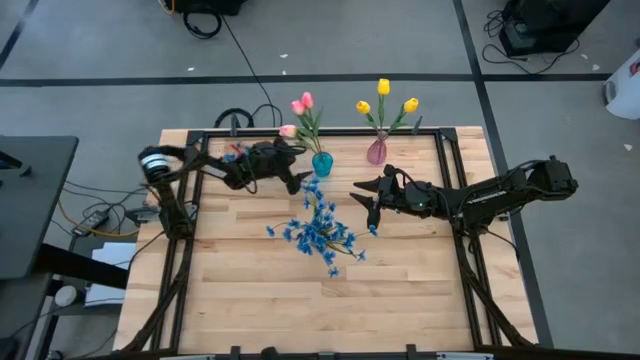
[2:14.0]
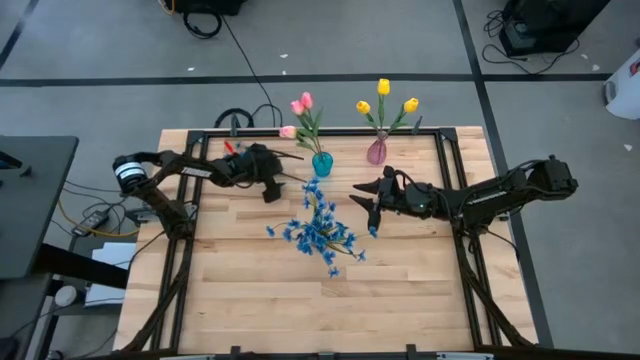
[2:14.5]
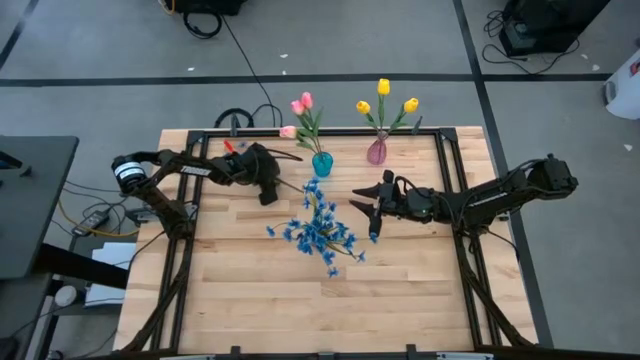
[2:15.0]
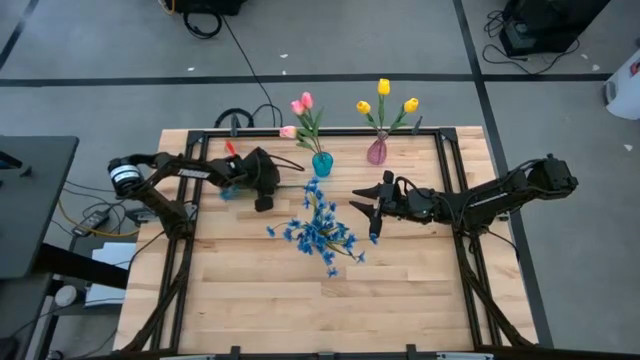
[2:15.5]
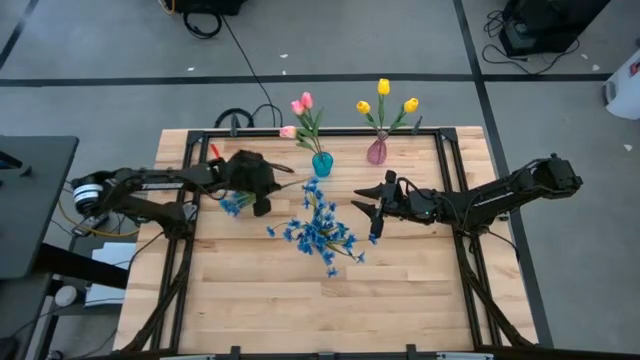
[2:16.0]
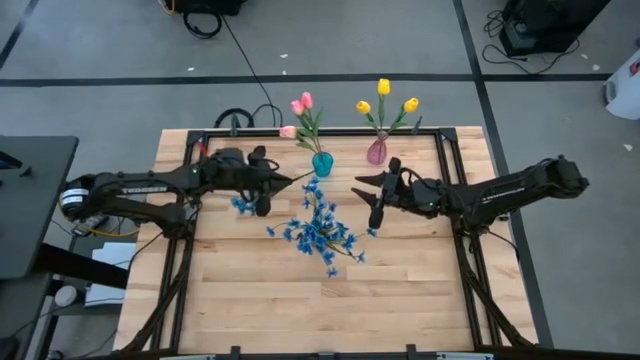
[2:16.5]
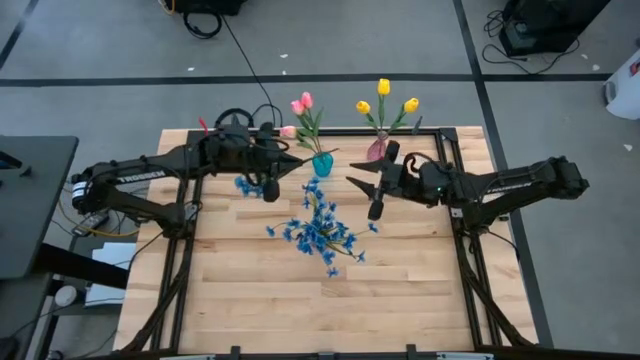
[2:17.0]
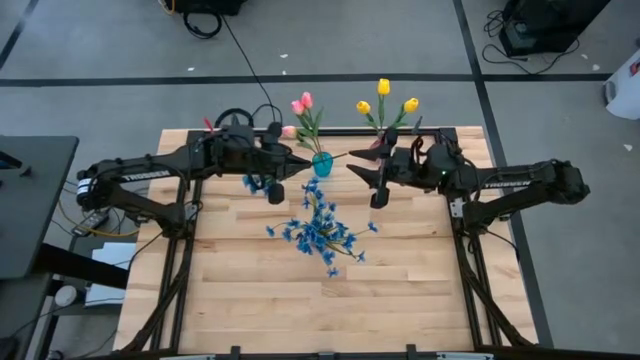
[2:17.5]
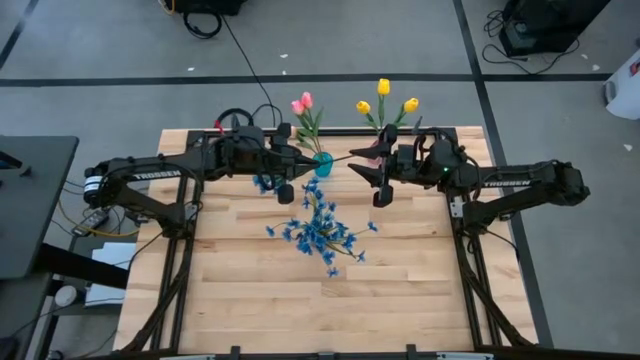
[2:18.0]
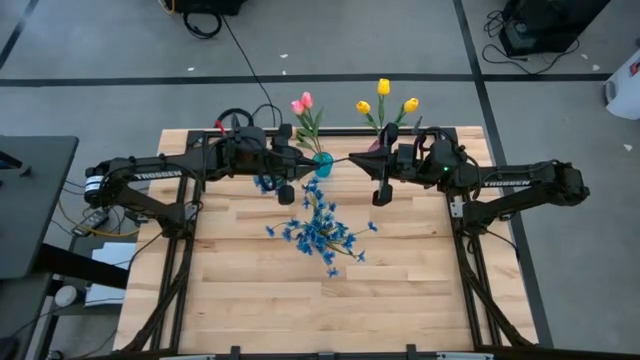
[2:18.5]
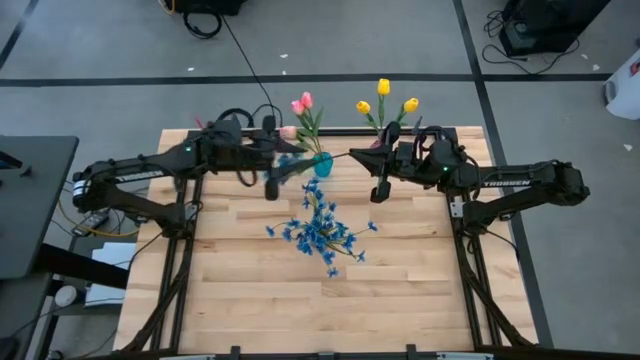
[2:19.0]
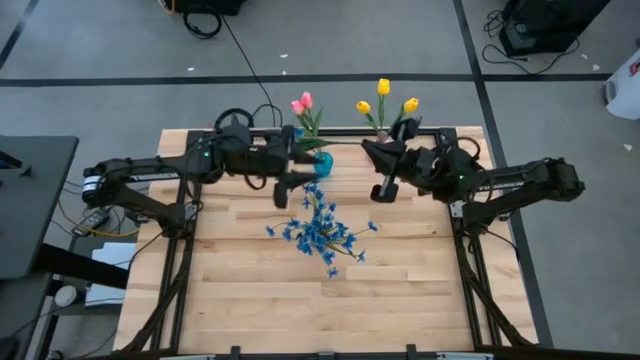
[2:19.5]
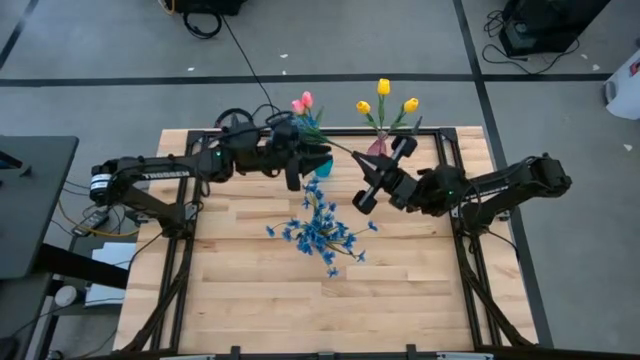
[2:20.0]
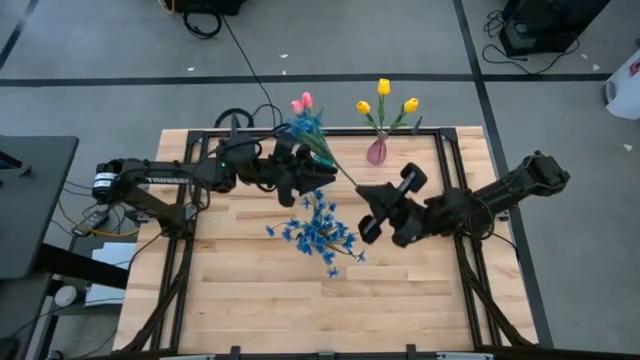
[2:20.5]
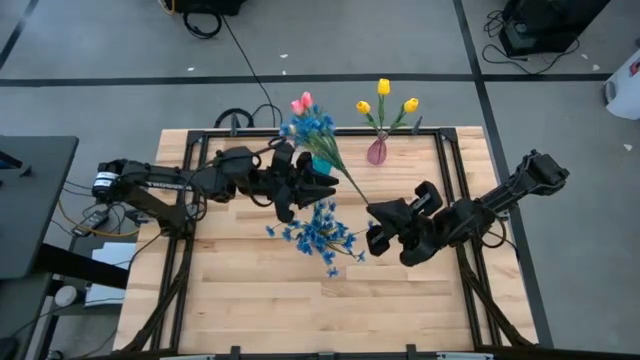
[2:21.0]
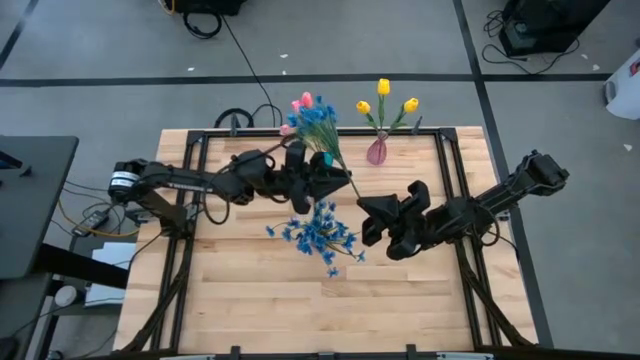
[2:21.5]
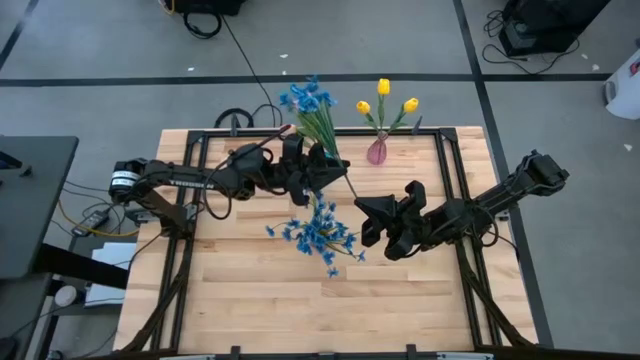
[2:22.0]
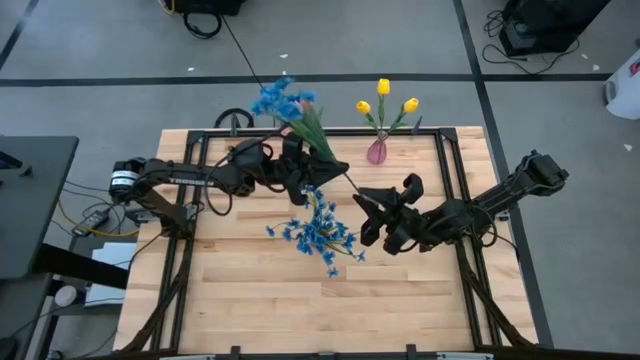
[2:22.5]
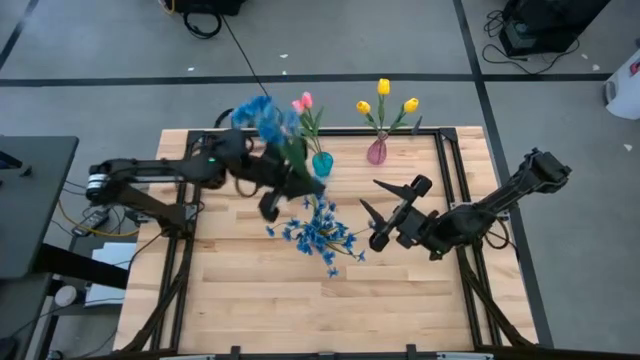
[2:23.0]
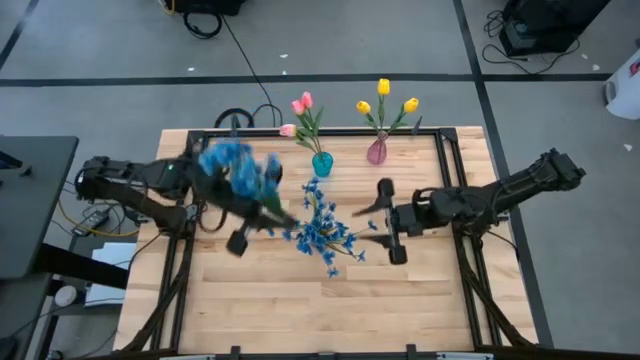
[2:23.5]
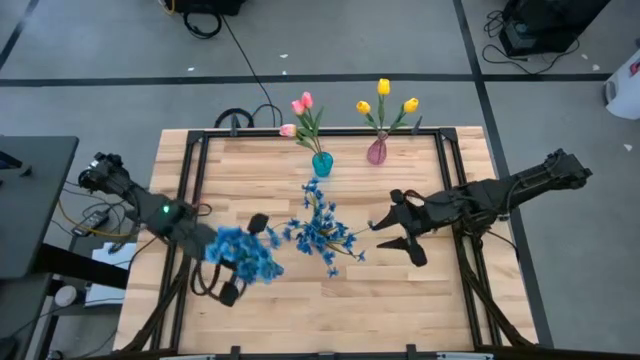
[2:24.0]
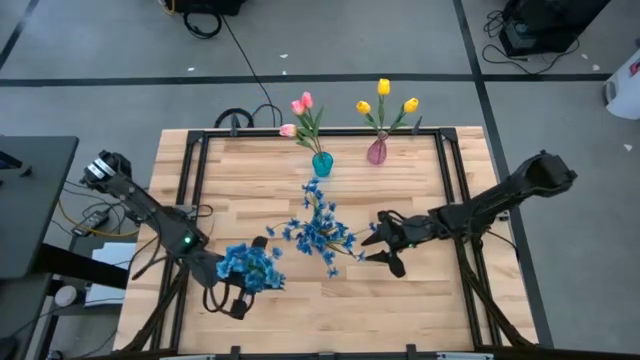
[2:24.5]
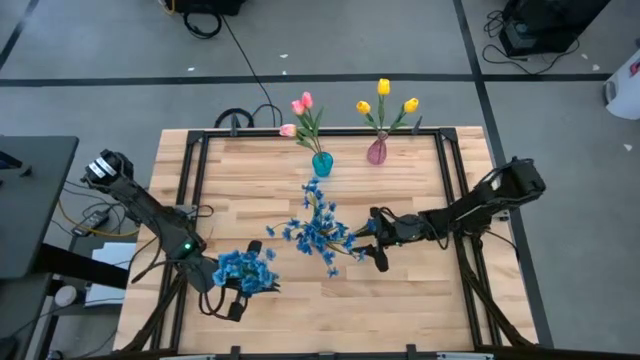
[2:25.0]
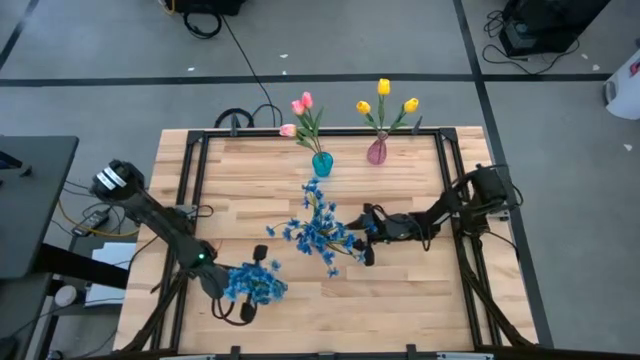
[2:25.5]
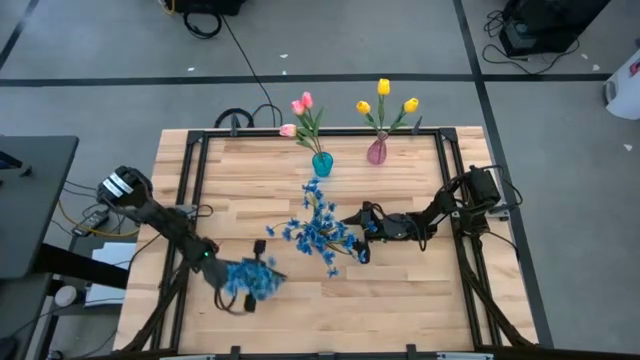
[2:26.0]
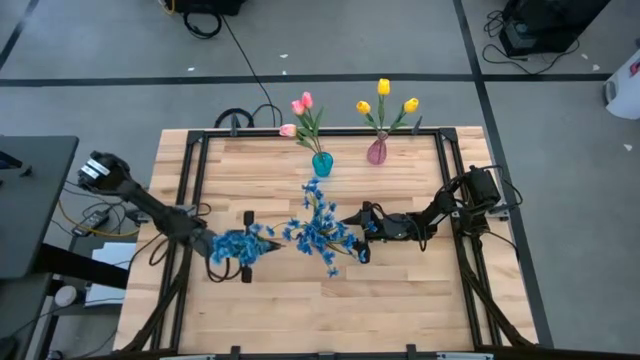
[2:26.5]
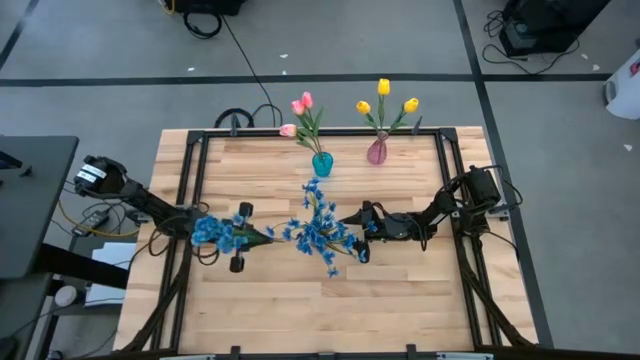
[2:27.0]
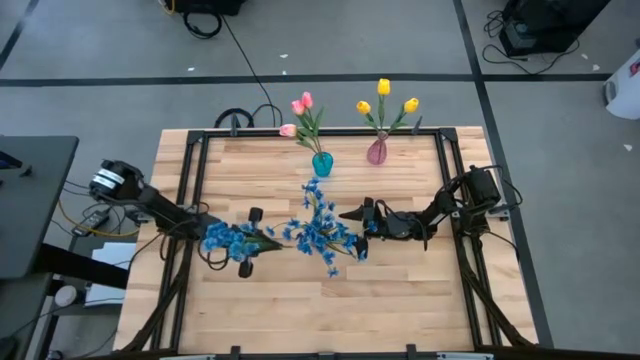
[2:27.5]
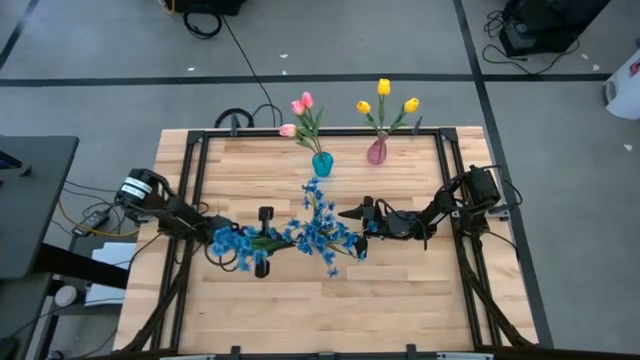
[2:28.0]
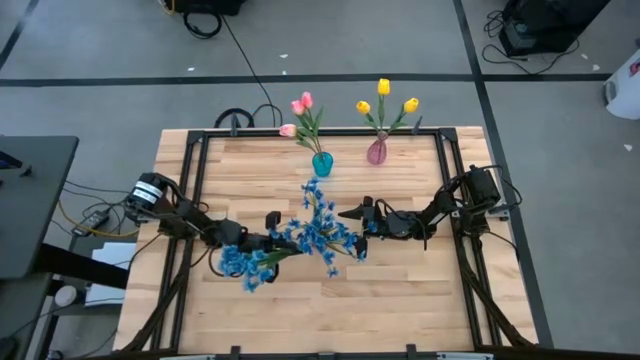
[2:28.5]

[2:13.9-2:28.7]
Task: Sort flowers into vase by color
Put the blue flower into the red vase

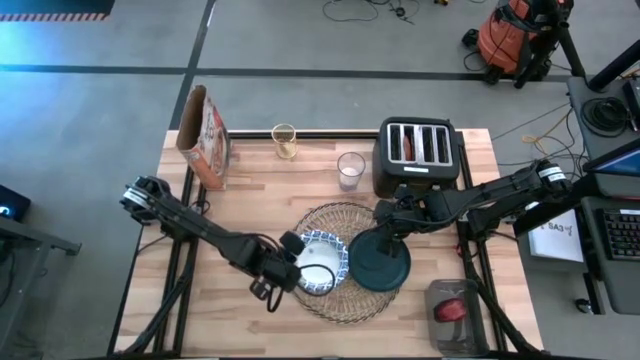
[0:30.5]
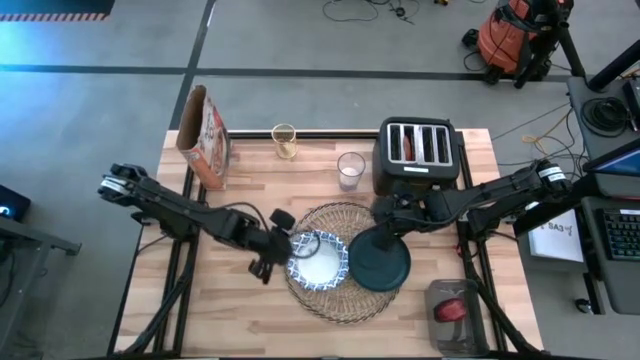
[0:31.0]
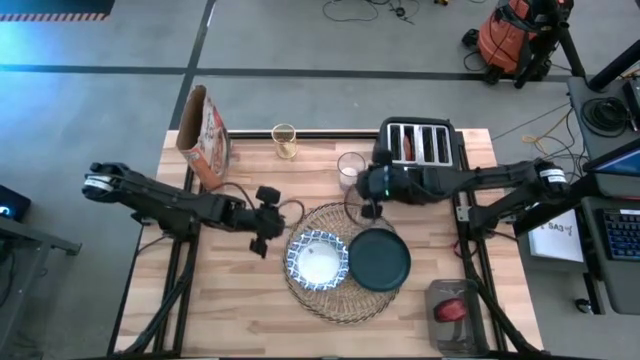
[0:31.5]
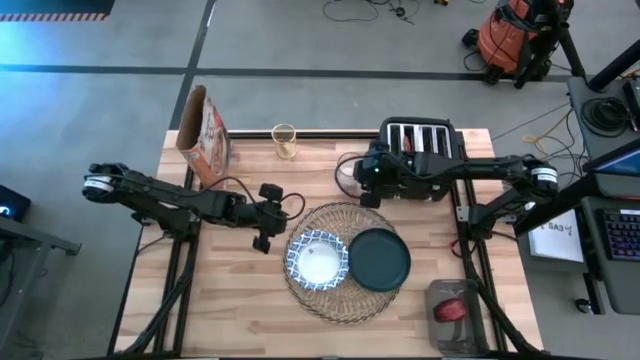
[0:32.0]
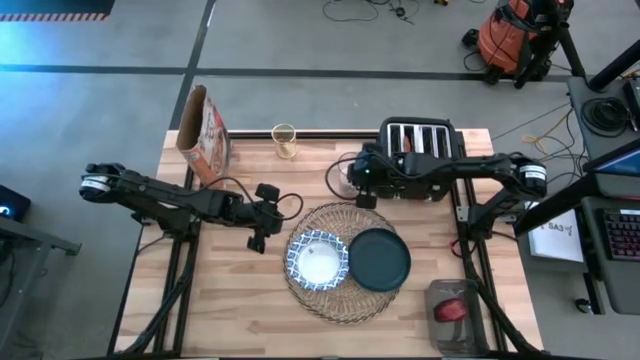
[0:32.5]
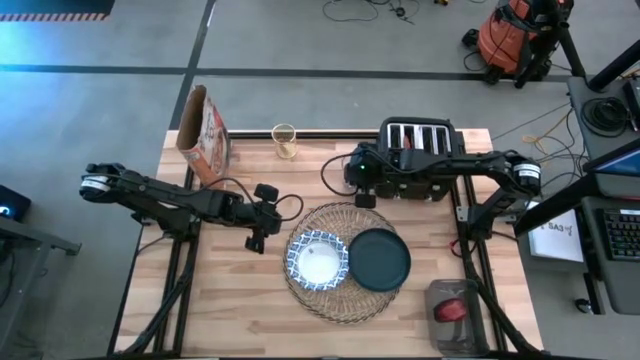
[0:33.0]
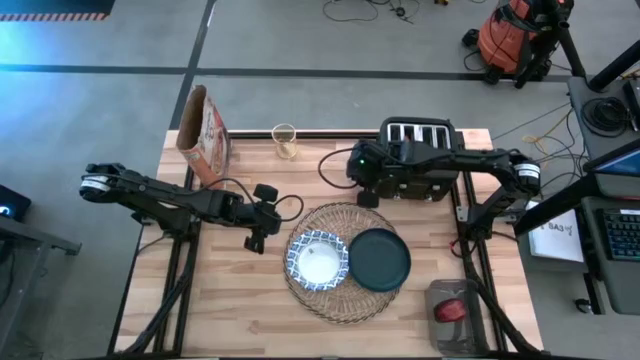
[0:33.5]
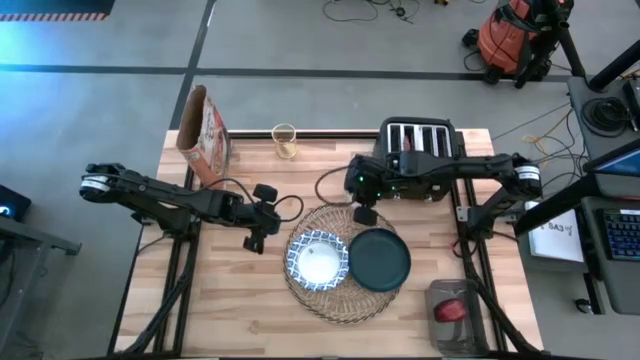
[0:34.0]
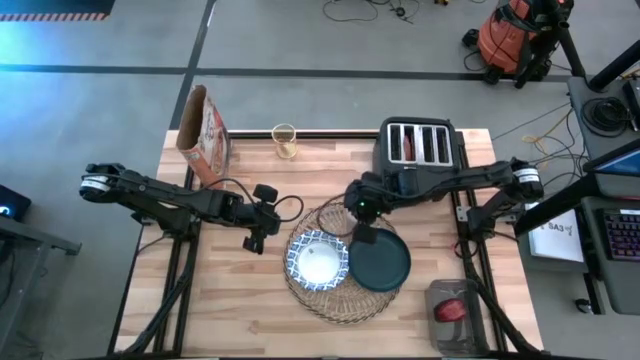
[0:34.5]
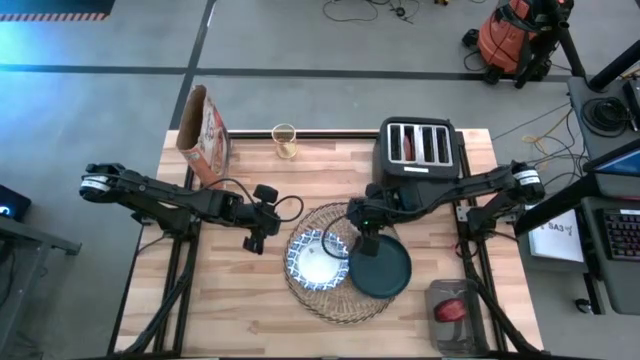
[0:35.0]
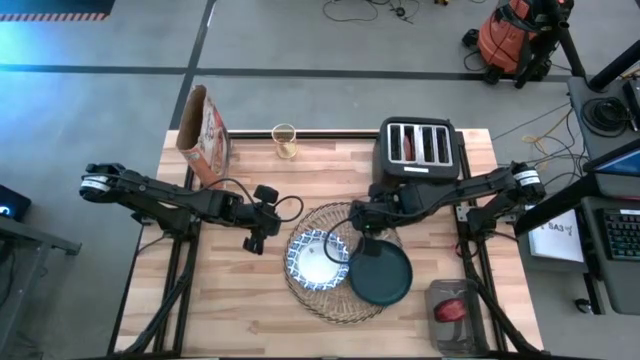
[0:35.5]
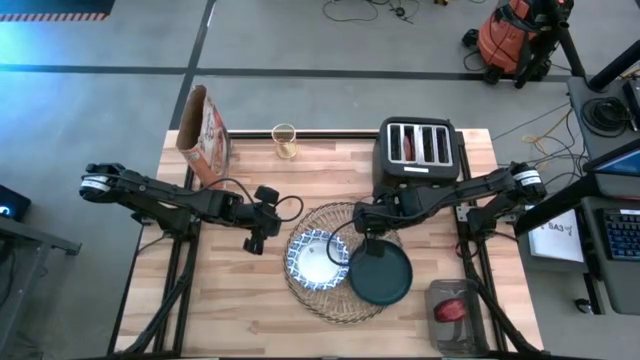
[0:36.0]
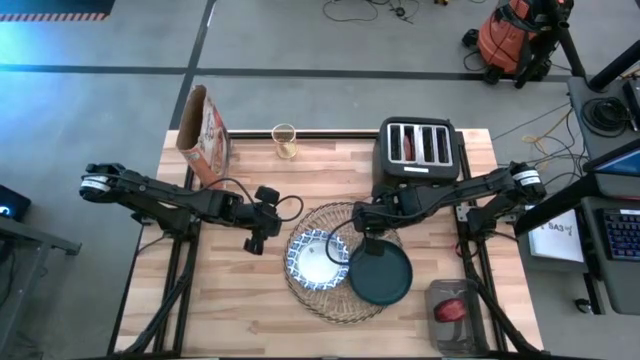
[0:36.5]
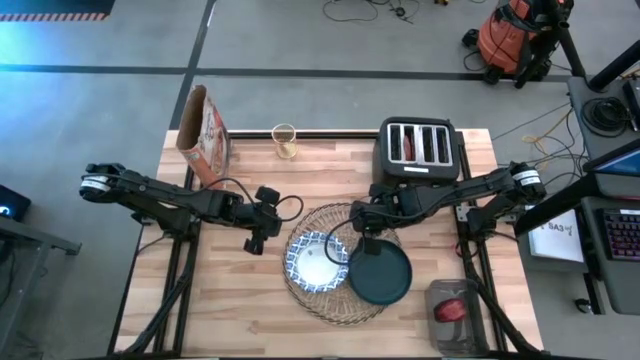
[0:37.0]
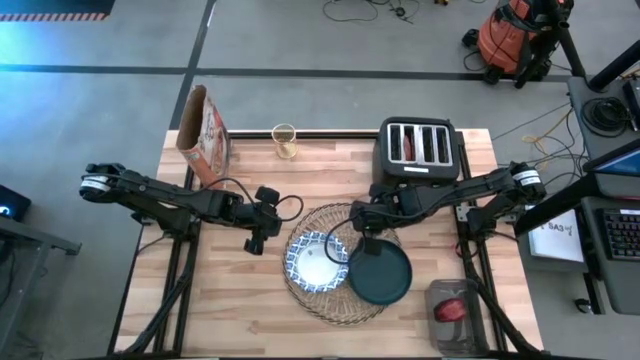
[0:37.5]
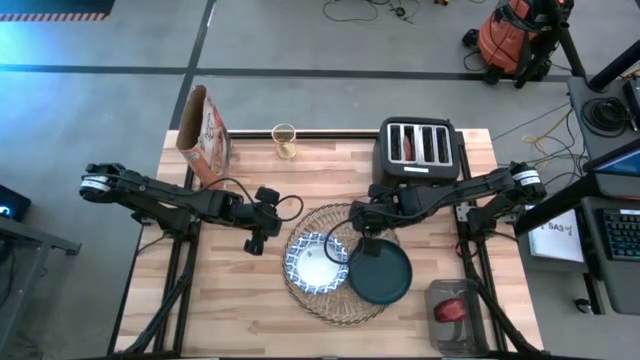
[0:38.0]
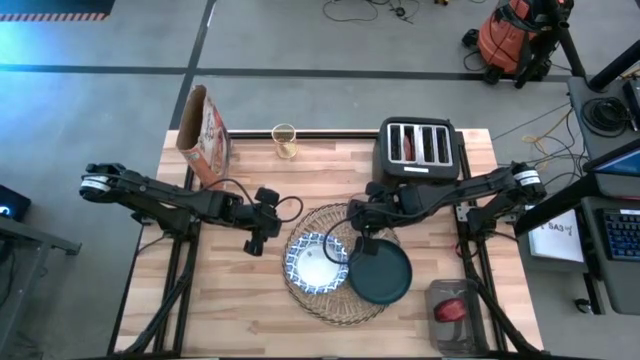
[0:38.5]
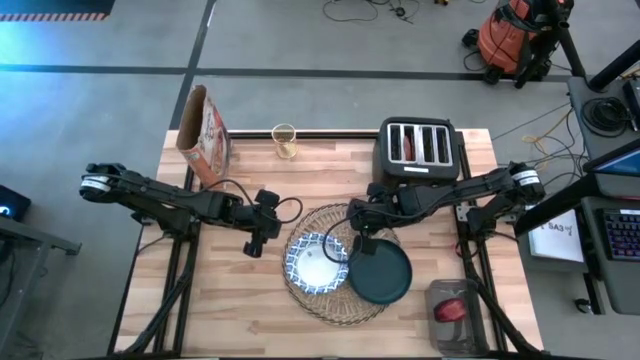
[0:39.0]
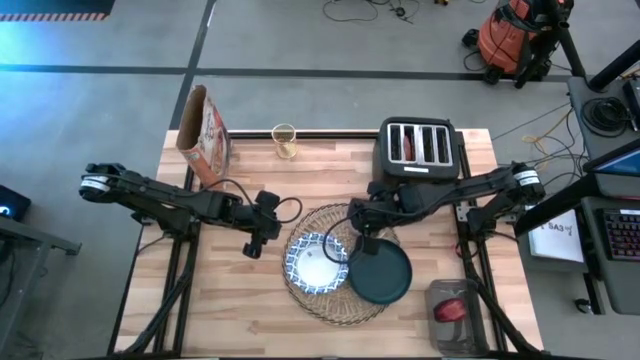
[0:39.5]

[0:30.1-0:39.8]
Task: Arrange a breakfast setting
Put the transparent glass of milk to the top right of the black plate on the brown table mat
